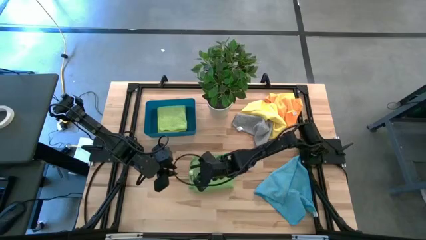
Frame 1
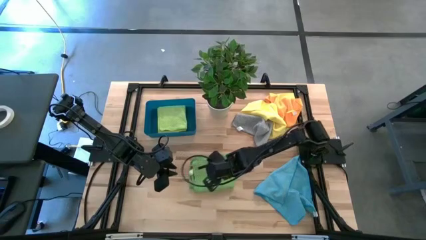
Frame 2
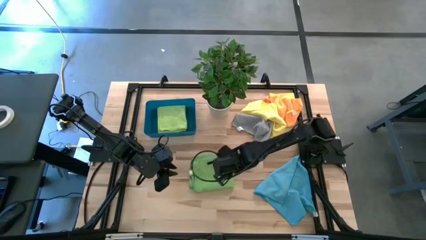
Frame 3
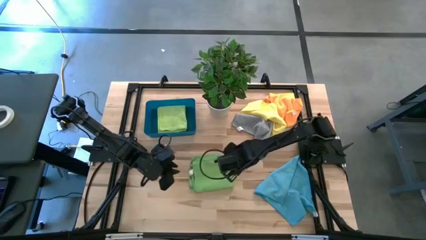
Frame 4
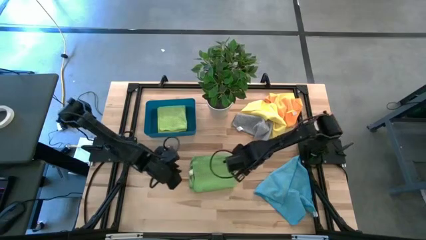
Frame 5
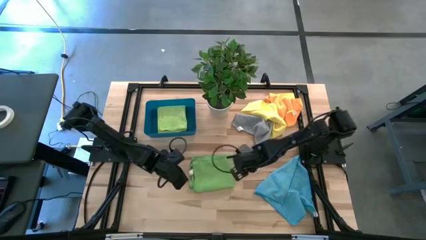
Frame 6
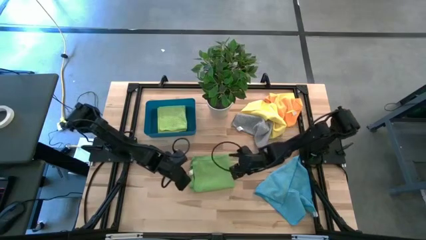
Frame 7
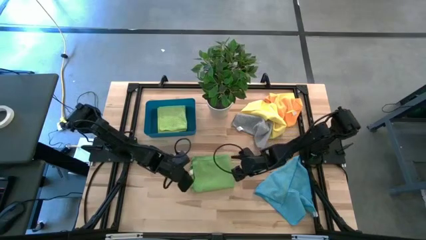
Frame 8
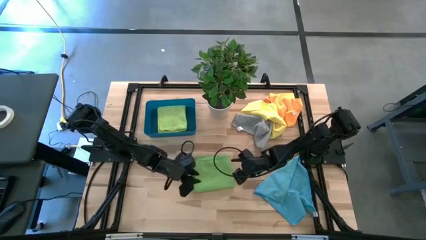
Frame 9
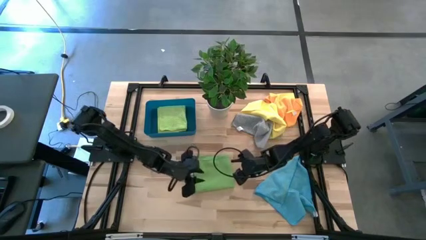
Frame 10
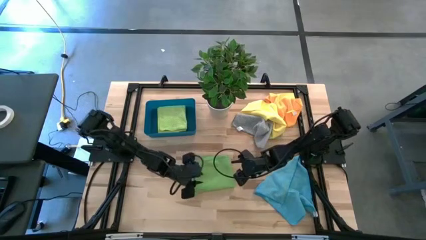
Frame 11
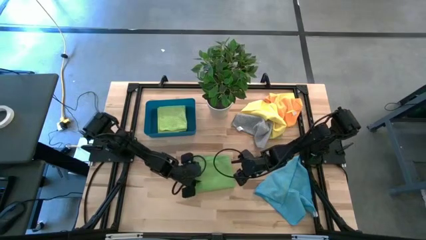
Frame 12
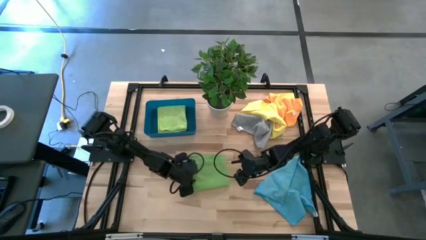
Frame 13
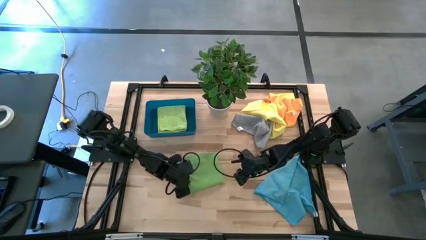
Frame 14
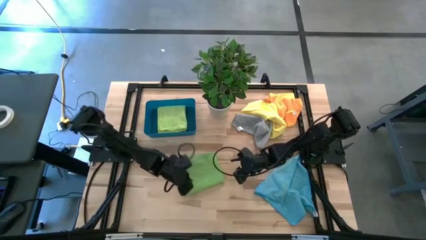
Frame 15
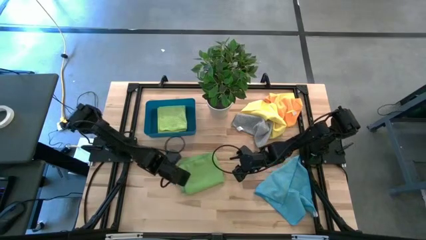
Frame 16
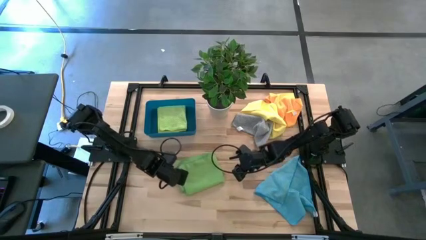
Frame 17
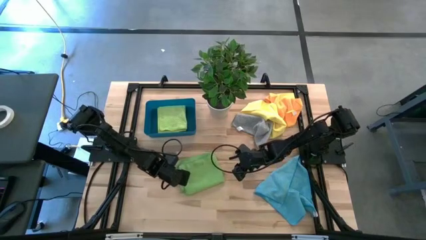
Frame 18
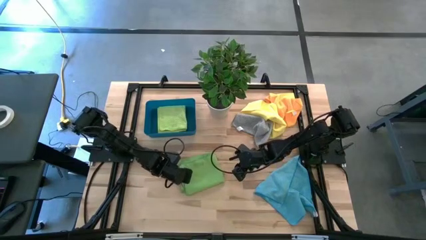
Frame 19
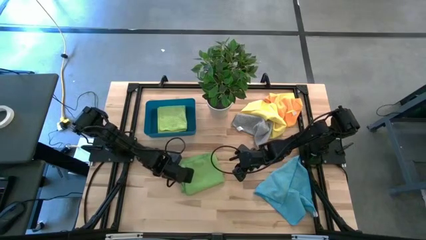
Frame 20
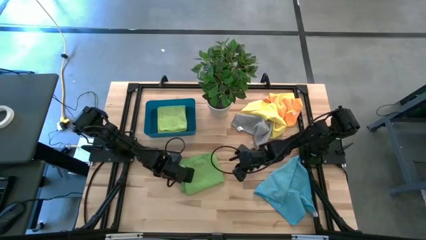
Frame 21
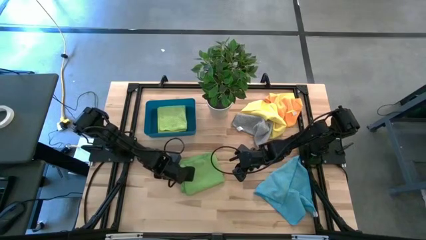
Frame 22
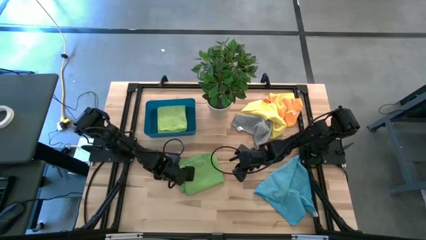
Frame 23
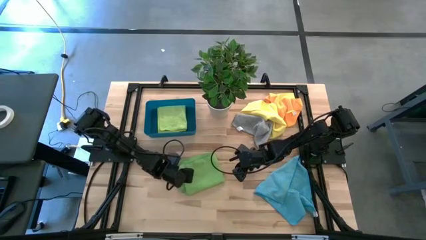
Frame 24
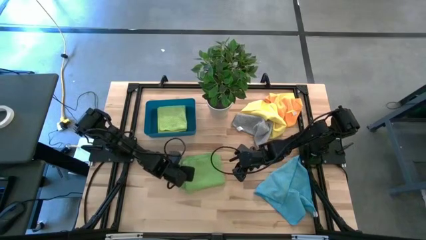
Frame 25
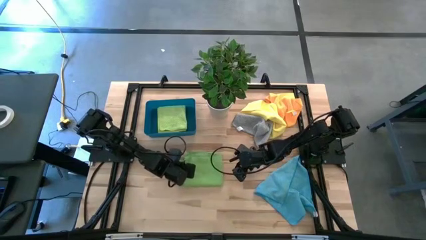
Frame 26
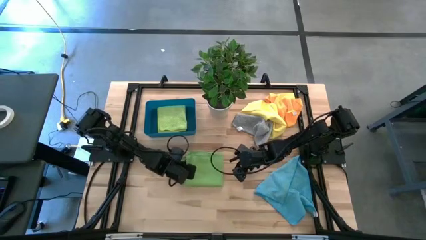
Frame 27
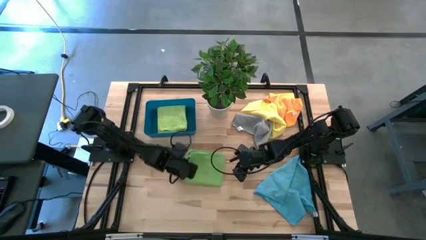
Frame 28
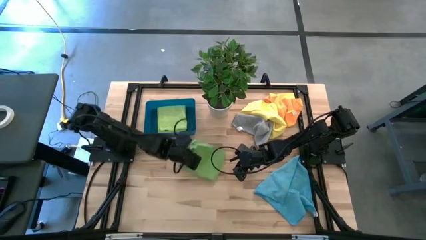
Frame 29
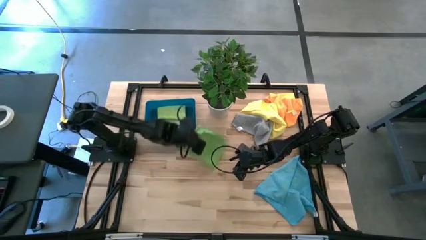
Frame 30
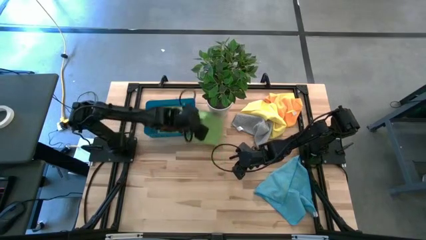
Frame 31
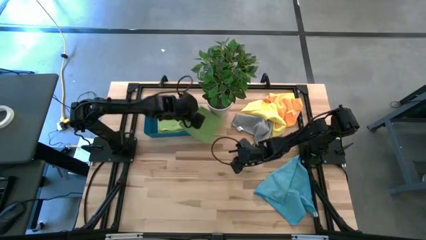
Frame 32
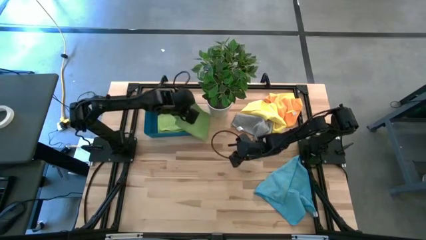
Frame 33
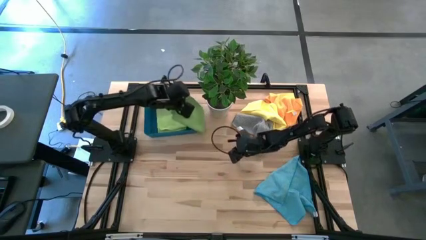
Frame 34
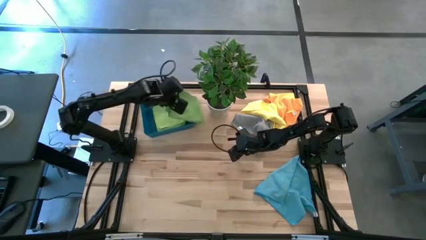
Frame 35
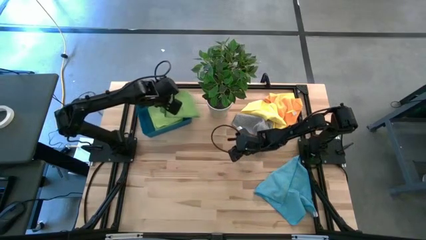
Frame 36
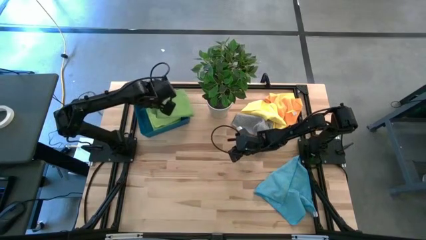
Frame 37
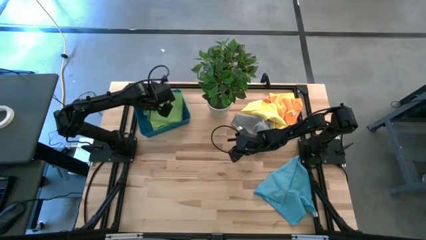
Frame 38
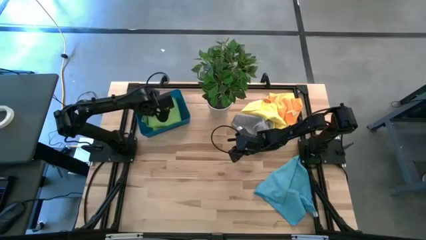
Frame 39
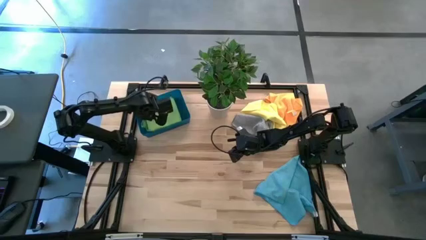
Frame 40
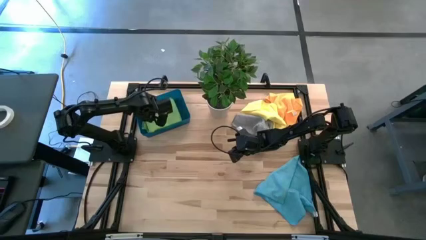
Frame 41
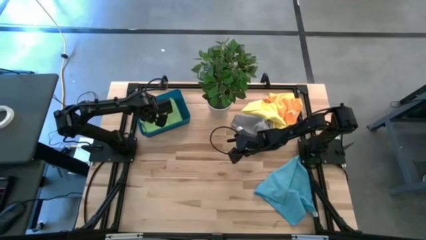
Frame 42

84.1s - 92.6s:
Task: Fold microfiber towels
Put the green towel into the blue bin

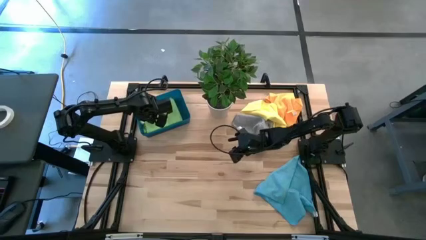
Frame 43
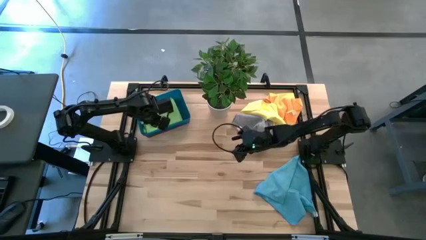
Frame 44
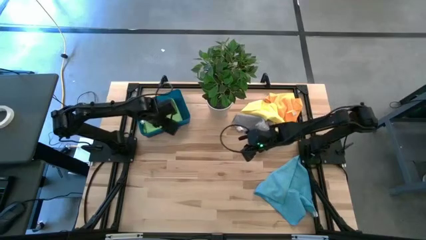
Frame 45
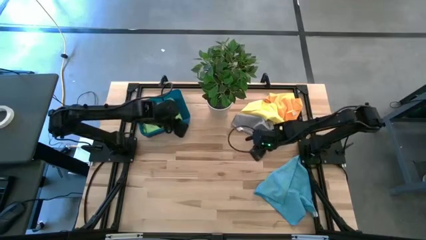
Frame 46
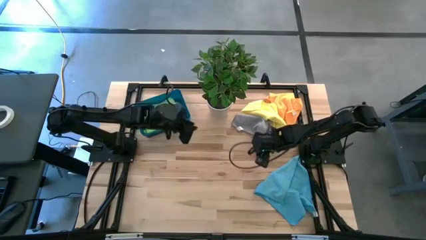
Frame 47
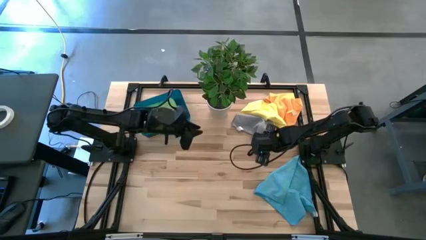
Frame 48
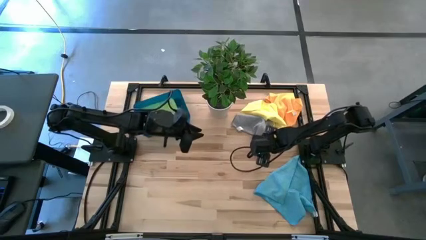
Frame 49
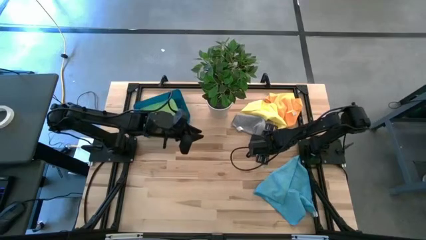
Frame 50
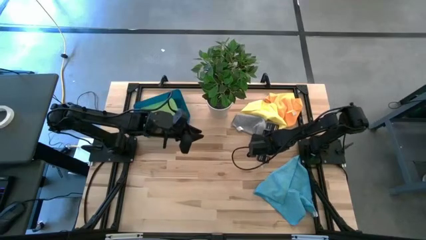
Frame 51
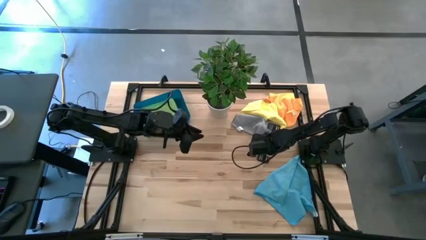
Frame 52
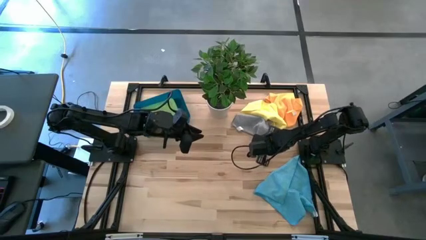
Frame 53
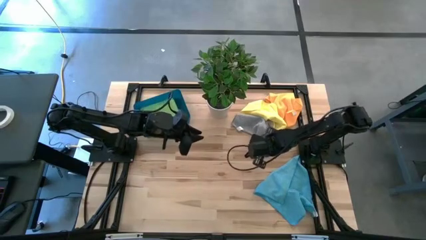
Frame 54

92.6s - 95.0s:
Fold the gray towel
